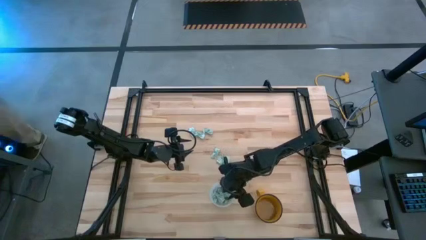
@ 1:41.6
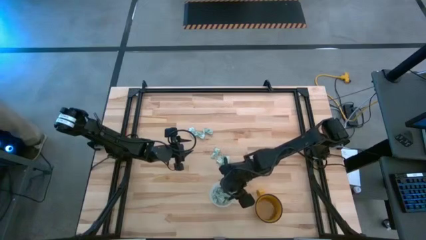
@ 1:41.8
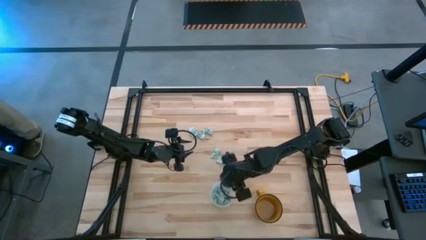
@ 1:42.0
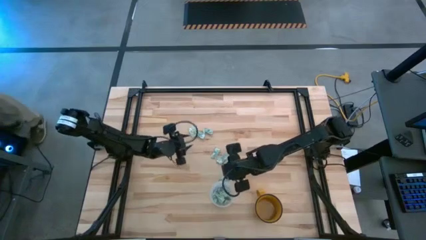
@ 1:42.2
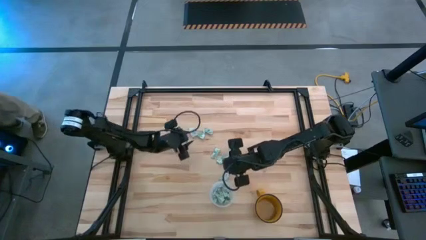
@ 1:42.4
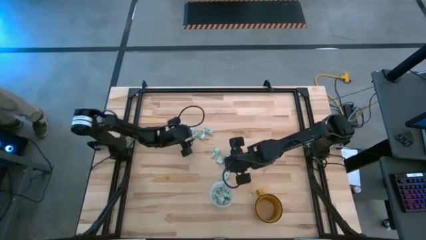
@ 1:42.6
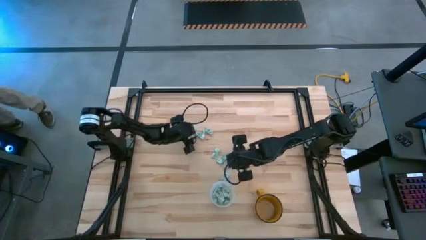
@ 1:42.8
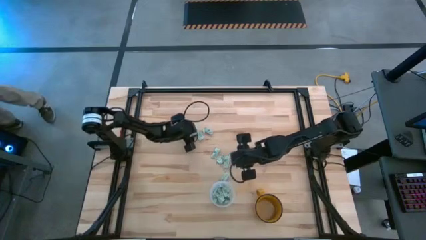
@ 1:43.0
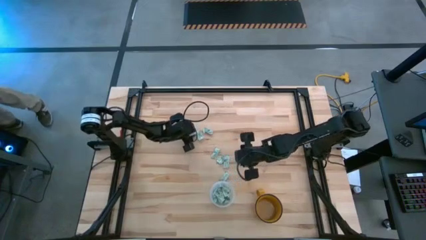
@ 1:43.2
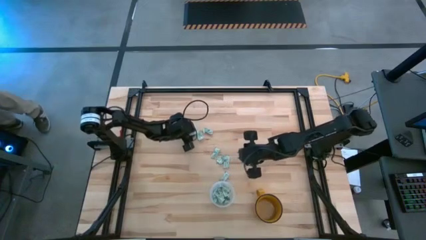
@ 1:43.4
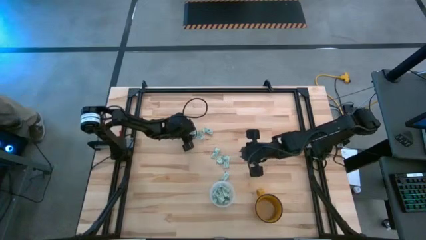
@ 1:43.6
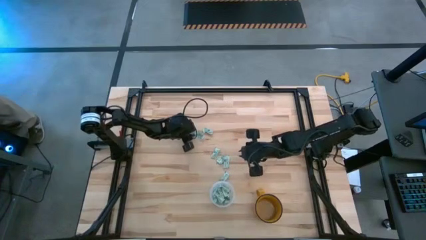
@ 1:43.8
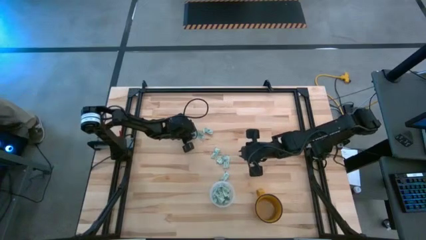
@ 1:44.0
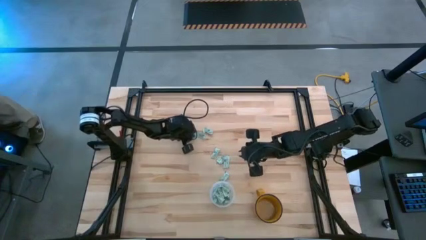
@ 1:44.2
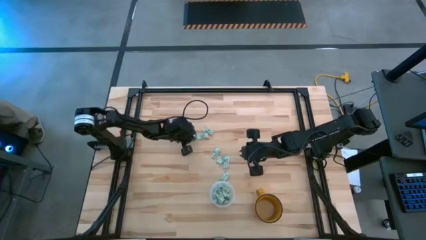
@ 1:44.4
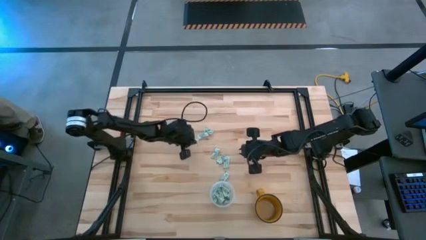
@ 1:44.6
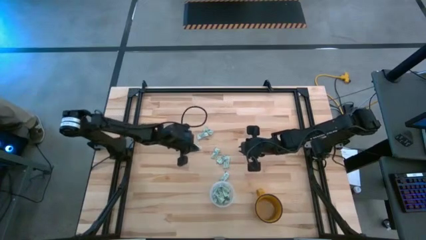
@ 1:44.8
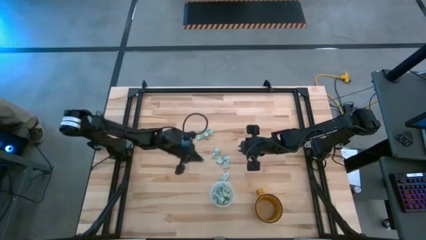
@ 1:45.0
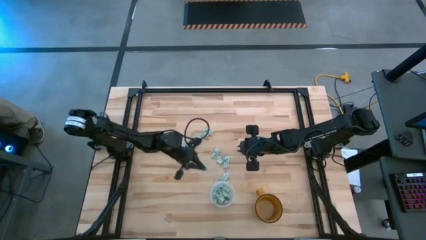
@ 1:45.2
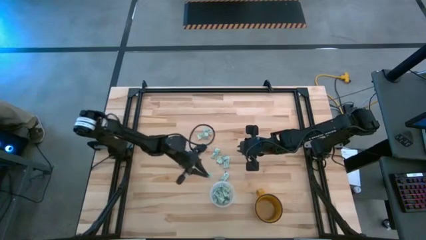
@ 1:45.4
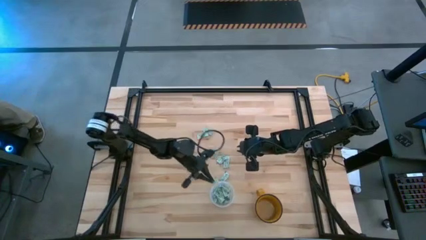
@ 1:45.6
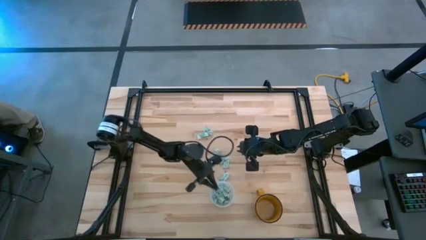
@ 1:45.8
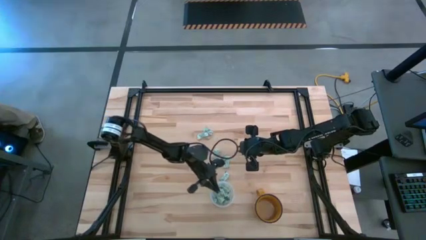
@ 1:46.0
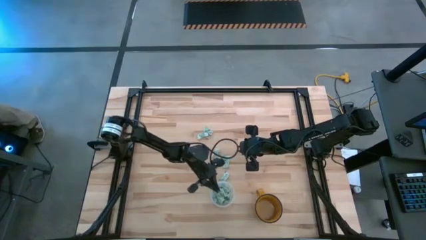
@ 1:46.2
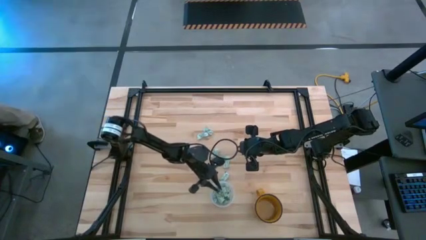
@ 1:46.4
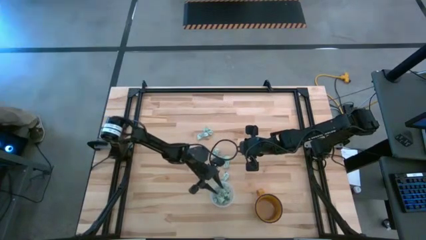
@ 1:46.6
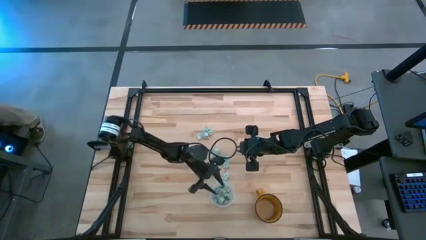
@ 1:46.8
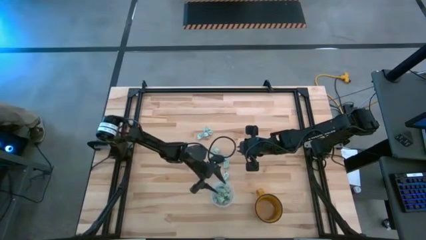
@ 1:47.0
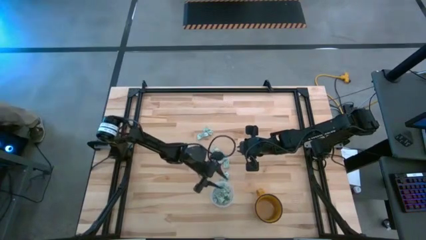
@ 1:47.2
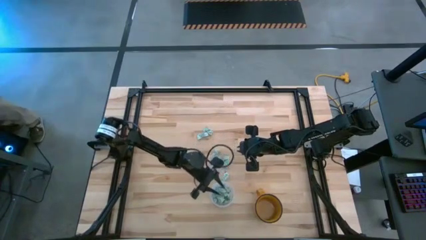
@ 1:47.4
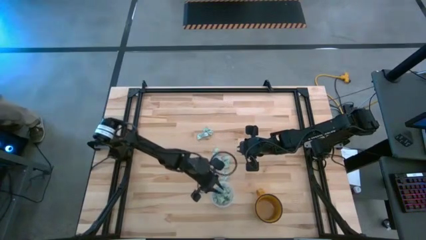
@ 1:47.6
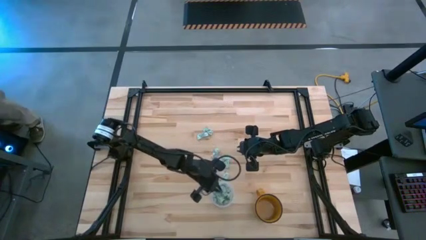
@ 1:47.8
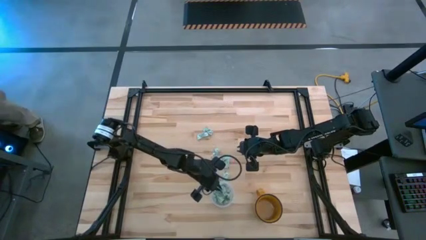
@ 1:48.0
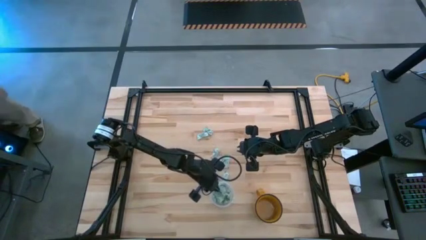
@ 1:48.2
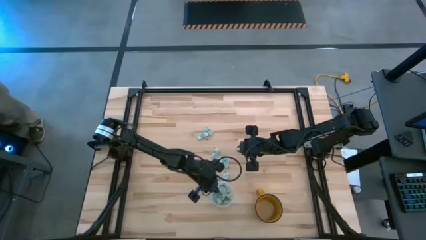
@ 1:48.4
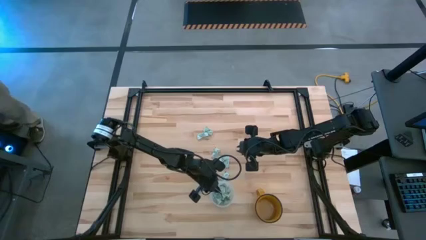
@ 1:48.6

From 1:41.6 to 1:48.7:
Task: Pick and place Stevia / Truvia into bins
Put the stevia packet into the transparent bin

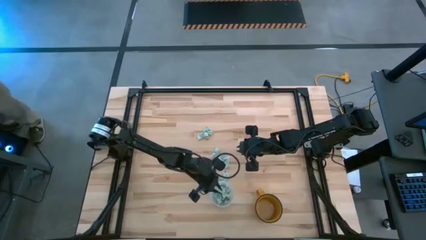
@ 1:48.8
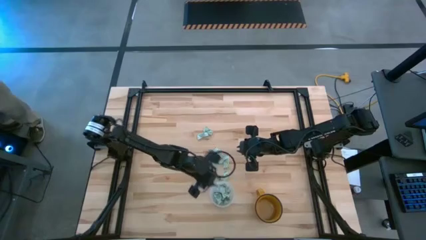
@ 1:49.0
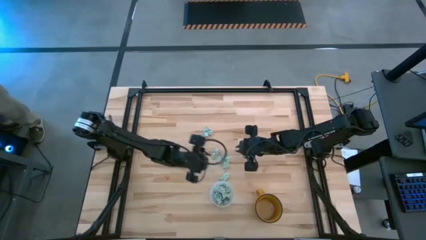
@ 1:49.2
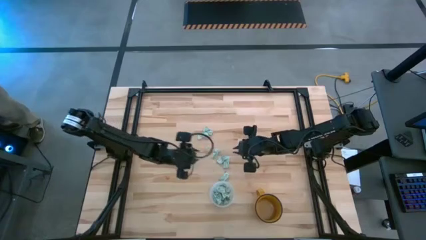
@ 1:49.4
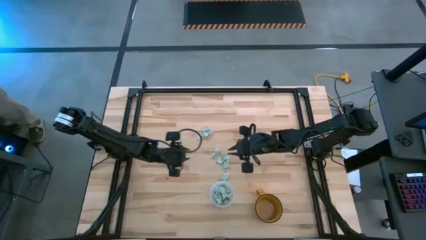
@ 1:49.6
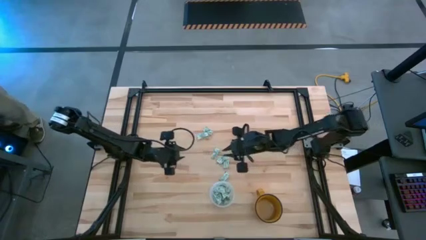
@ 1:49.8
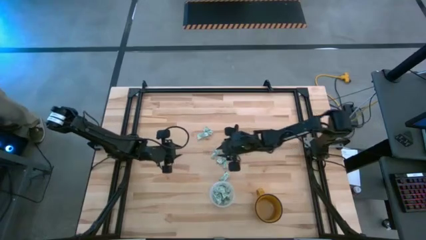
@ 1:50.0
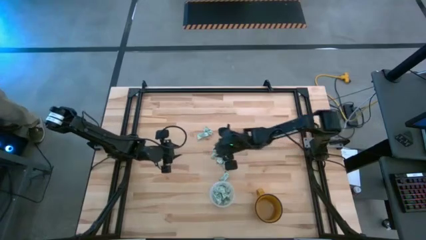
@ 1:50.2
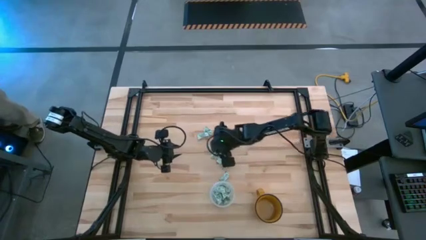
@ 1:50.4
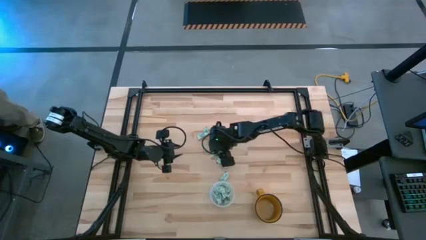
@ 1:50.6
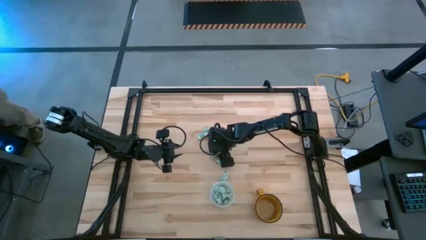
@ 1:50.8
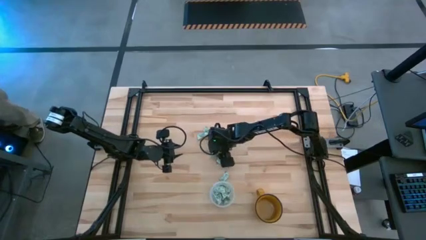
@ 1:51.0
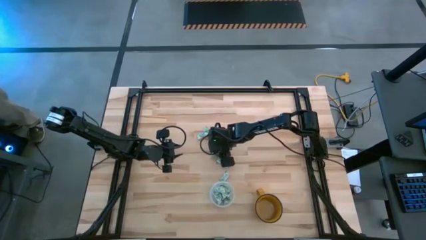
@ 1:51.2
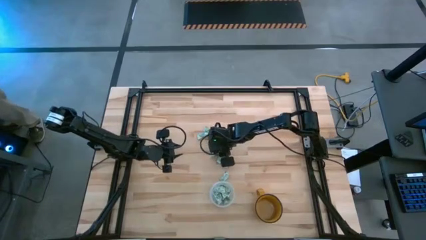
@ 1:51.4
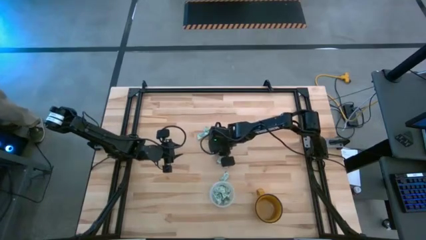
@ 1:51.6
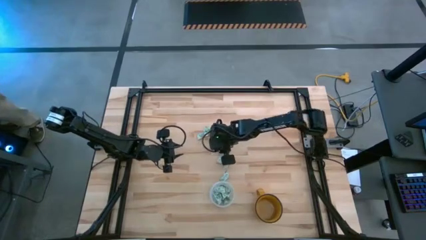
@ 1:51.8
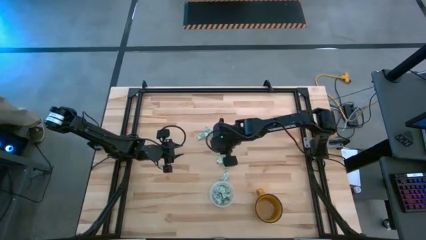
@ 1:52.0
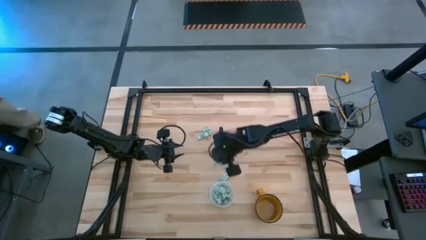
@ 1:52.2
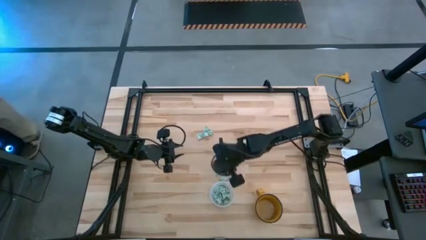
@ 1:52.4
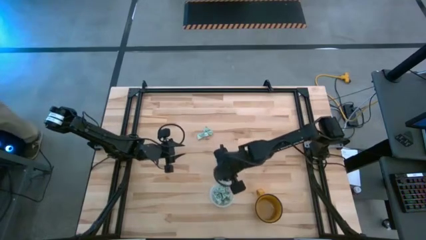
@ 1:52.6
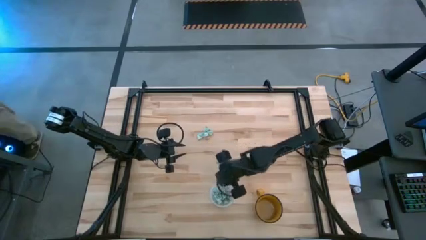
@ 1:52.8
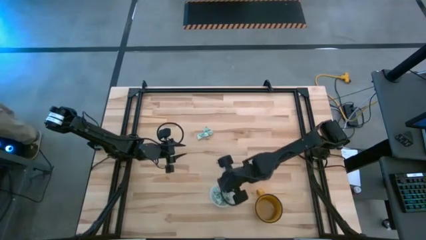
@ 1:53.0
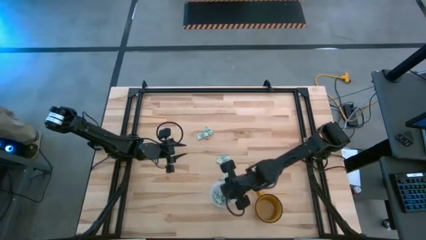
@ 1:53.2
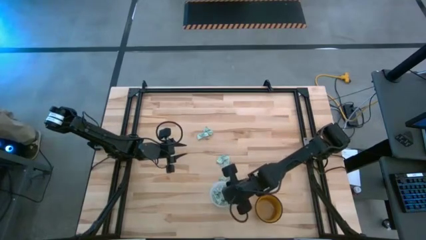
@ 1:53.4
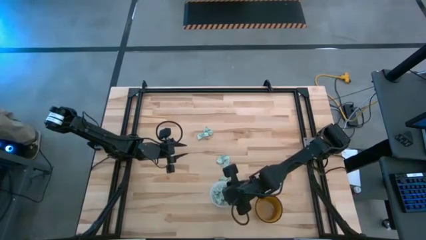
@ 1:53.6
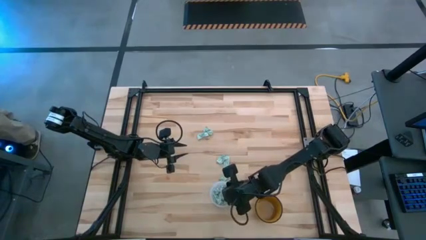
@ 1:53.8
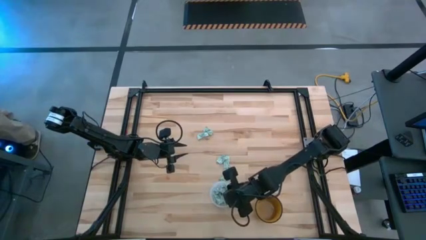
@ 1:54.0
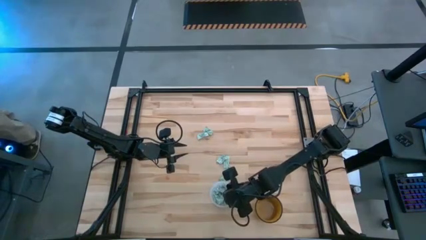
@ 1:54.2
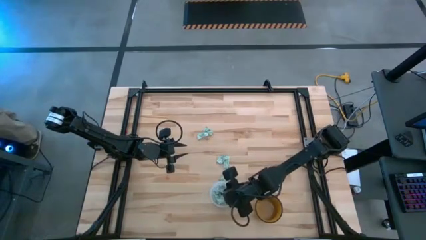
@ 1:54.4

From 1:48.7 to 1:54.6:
Put the stevia packet into the transparent bin

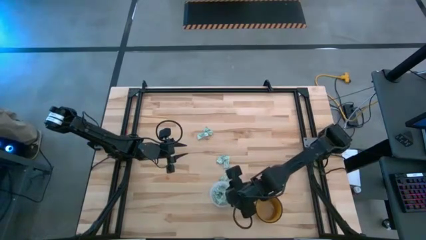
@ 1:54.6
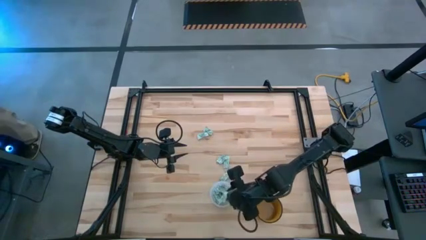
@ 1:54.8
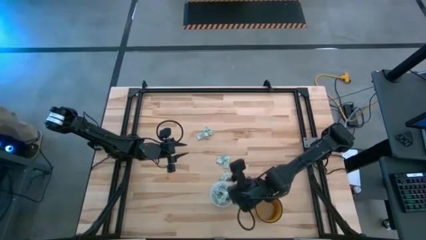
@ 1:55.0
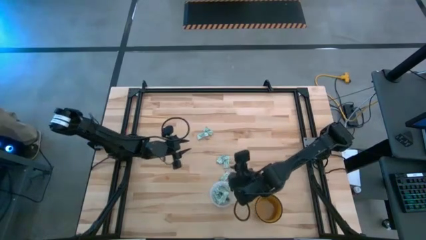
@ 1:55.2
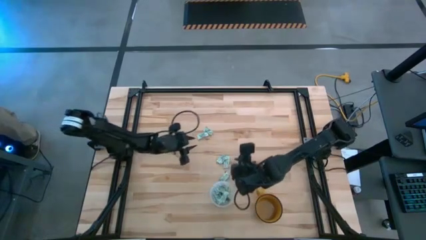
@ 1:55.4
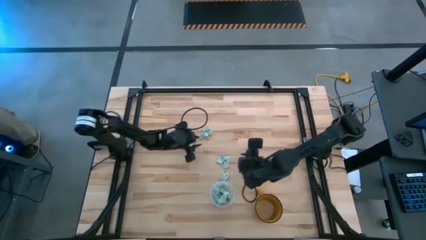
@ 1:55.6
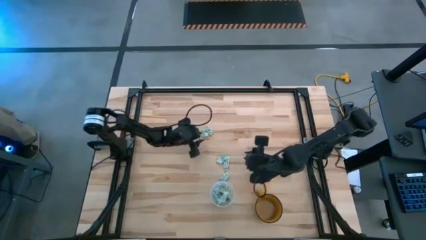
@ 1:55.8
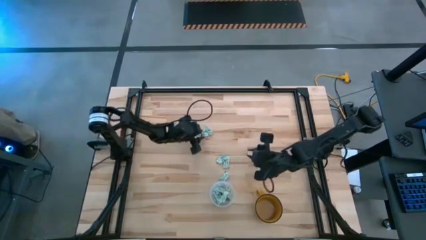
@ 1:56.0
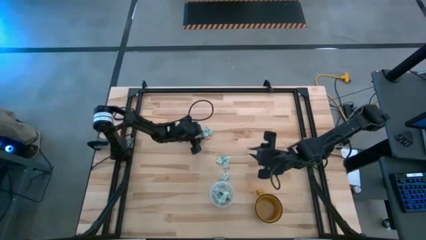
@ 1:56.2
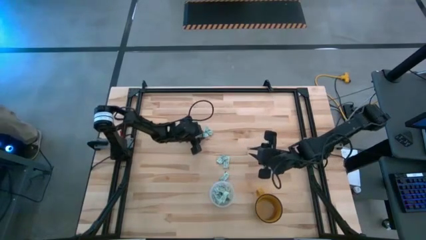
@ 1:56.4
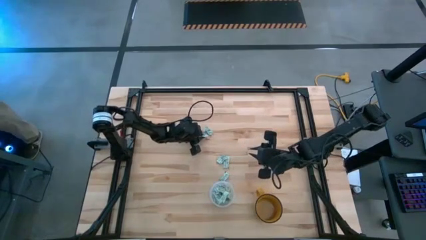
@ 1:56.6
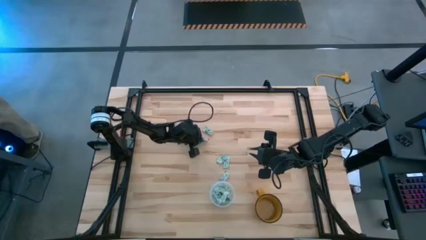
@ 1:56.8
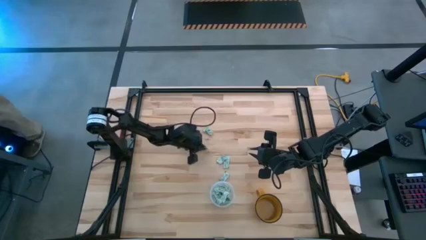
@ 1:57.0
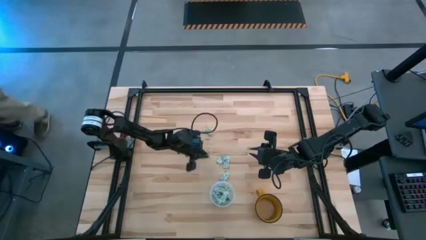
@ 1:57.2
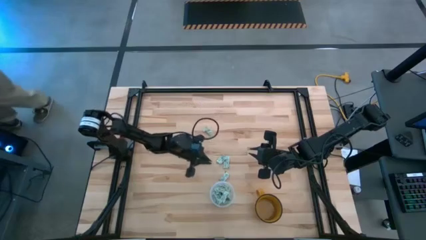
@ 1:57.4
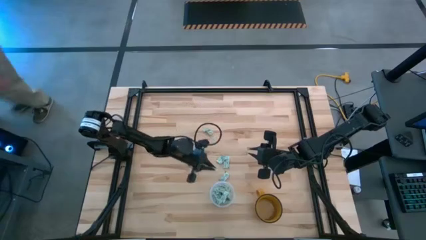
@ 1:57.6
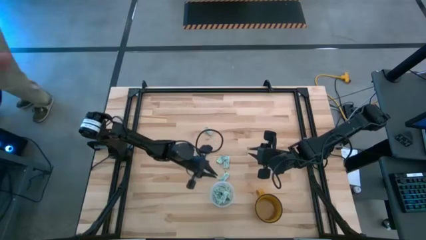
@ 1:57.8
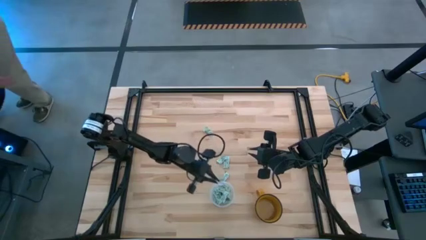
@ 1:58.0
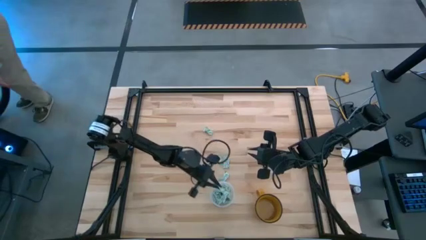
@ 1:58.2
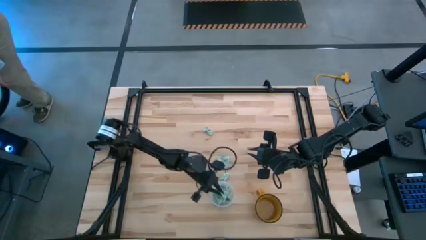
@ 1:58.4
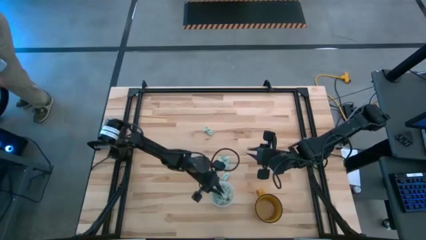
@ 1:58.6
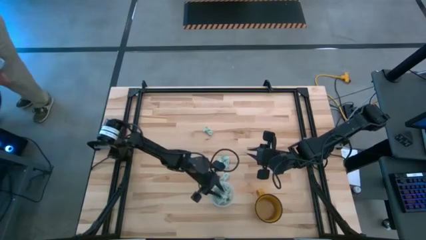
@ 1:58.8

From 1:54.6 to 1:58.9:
Put the stevia packet into the transparent bin
